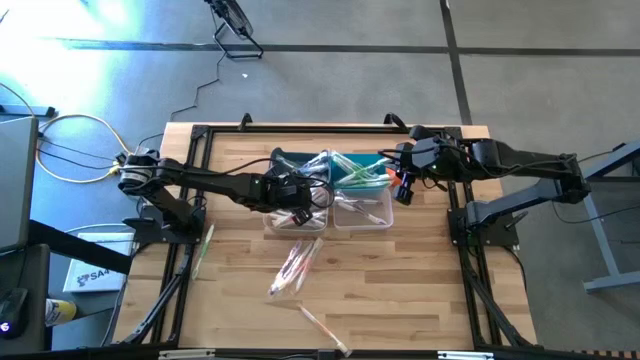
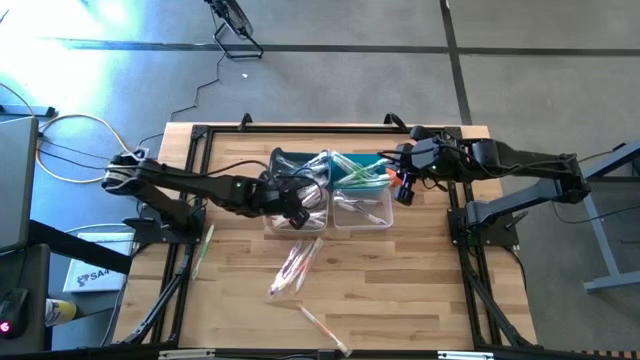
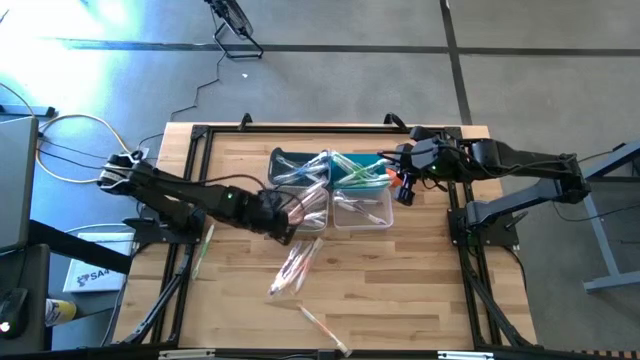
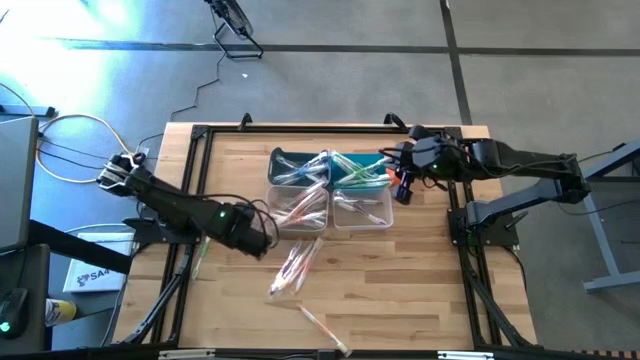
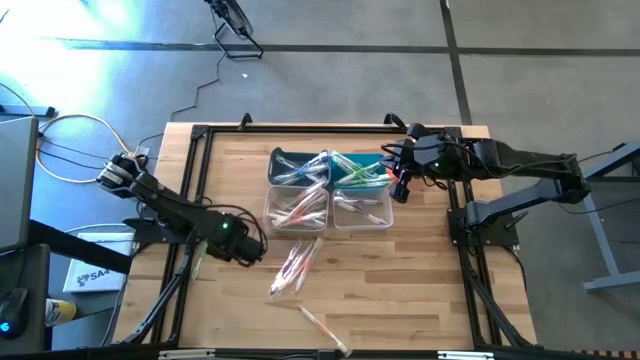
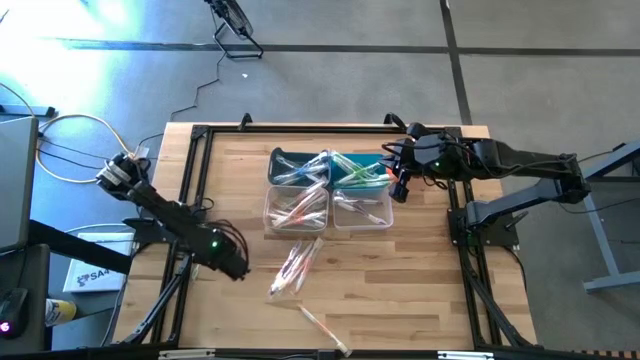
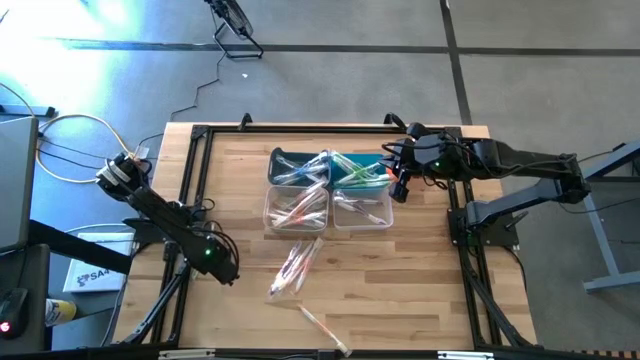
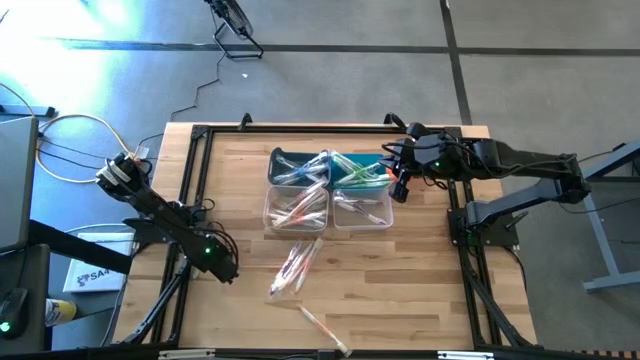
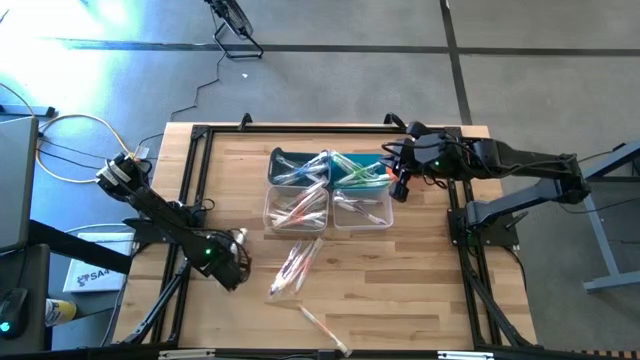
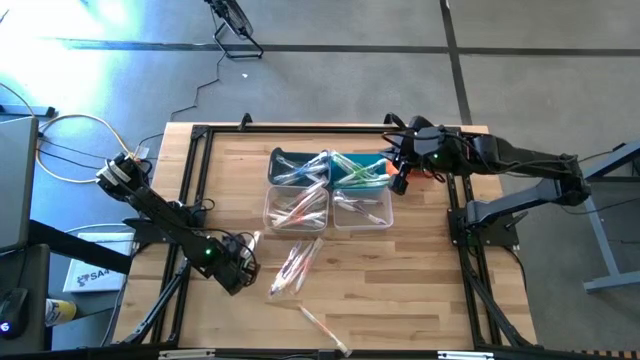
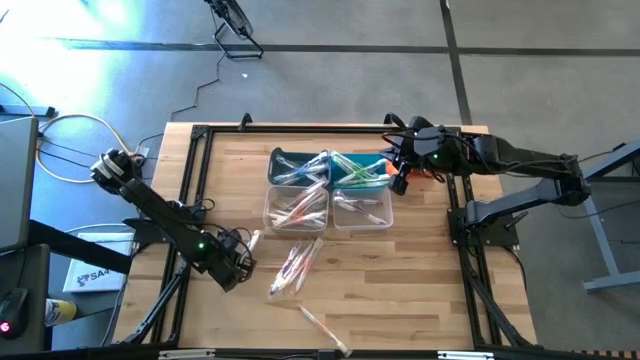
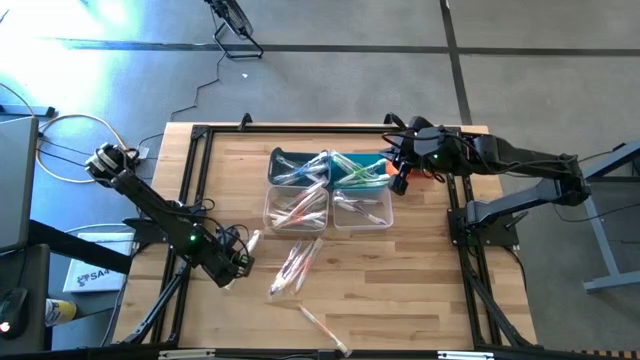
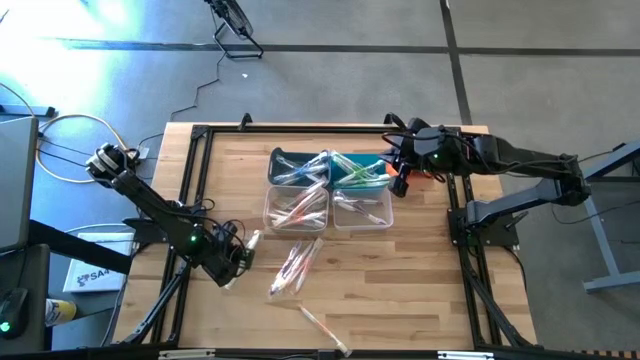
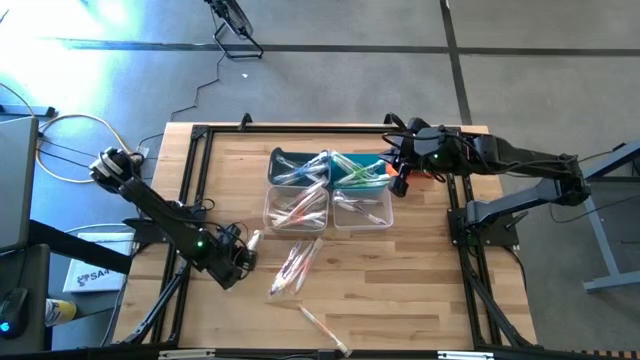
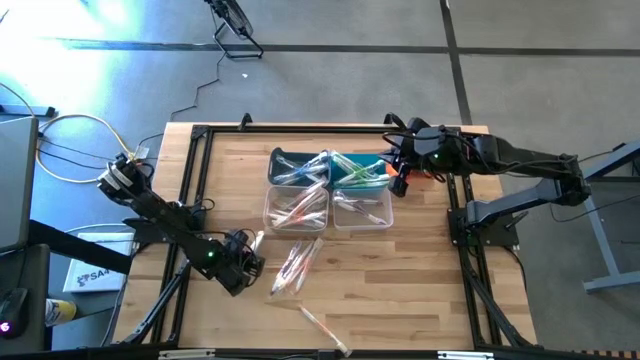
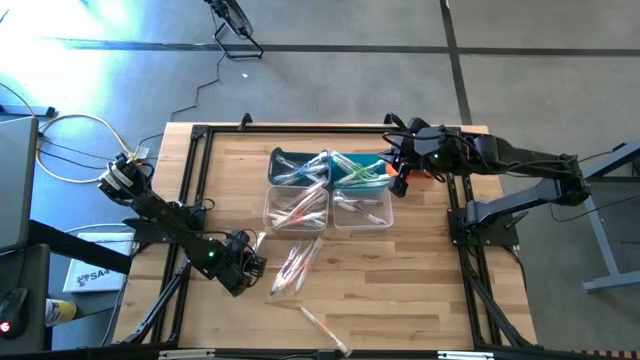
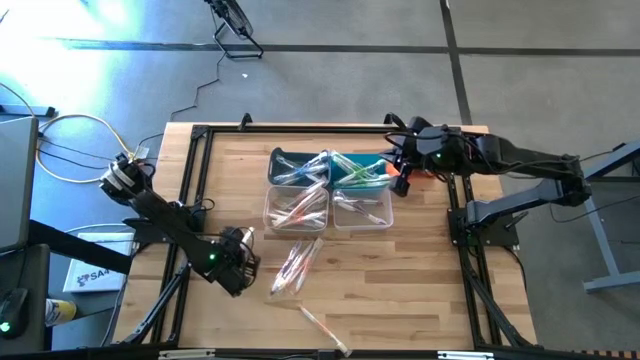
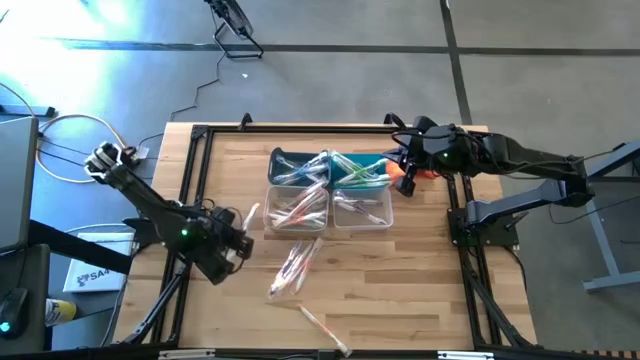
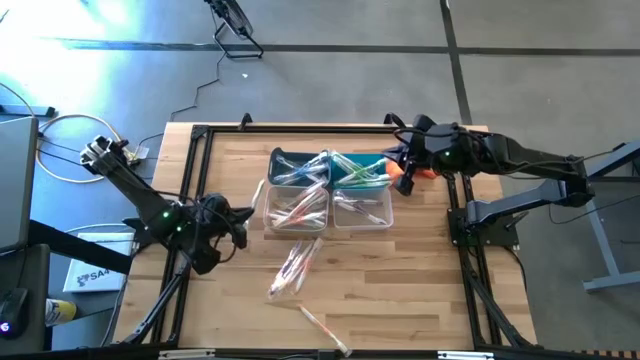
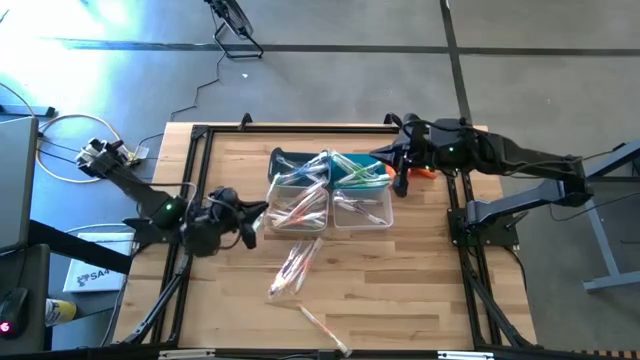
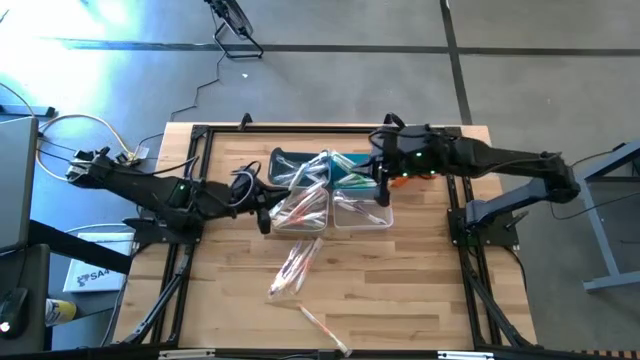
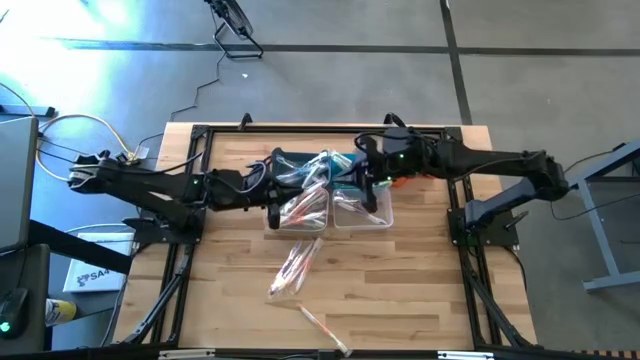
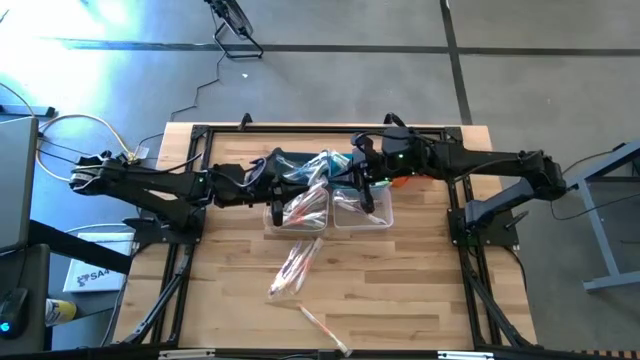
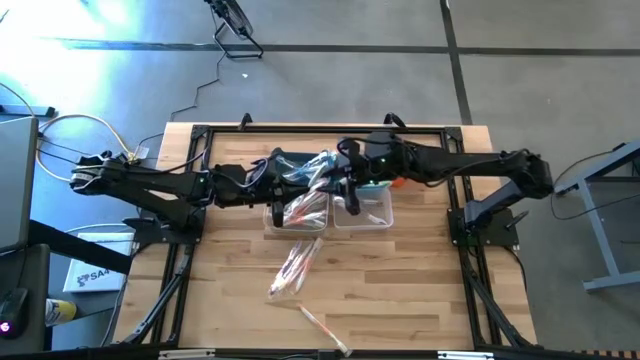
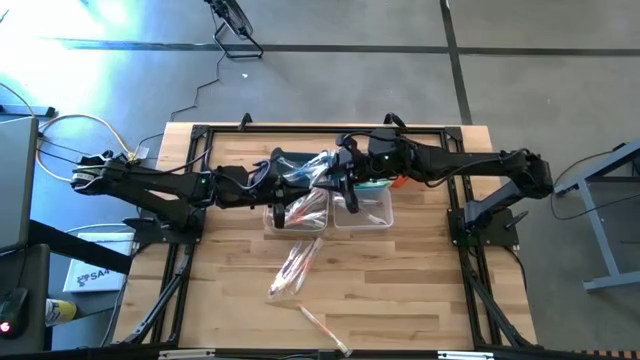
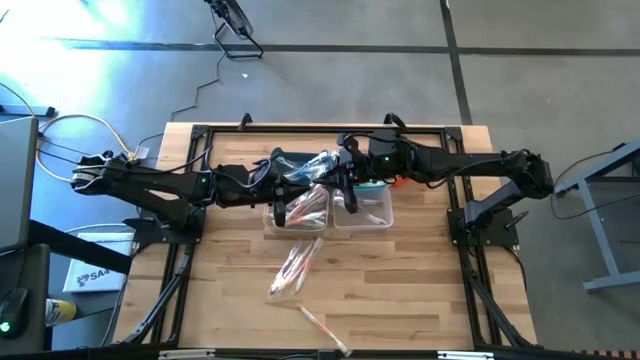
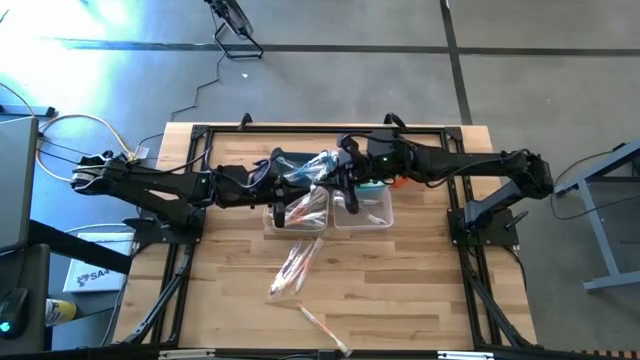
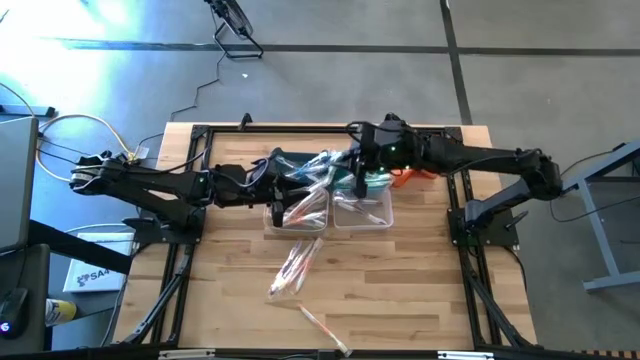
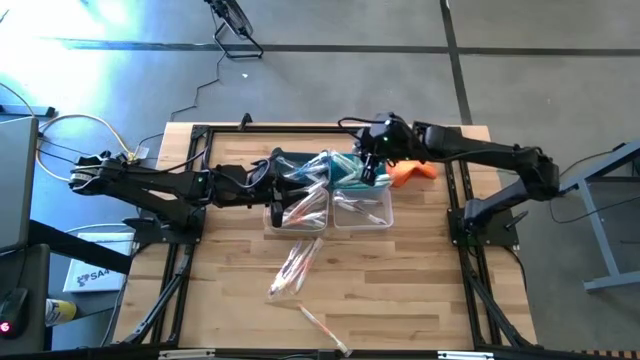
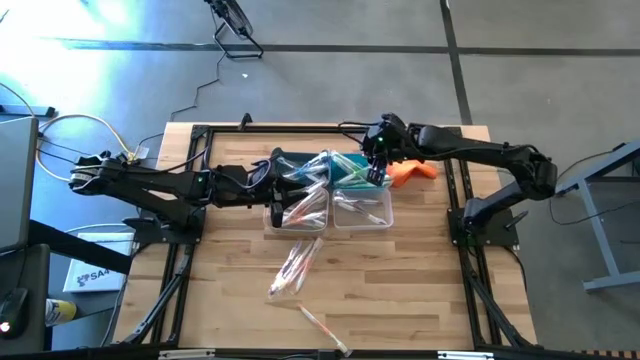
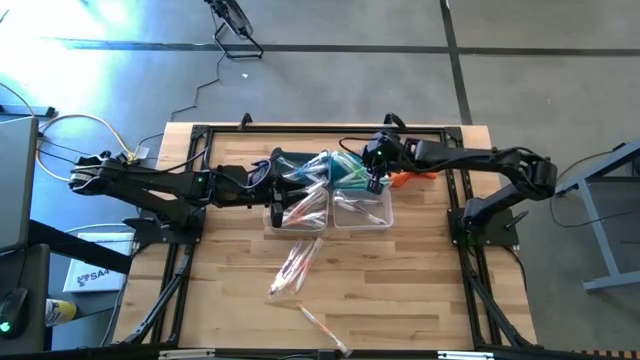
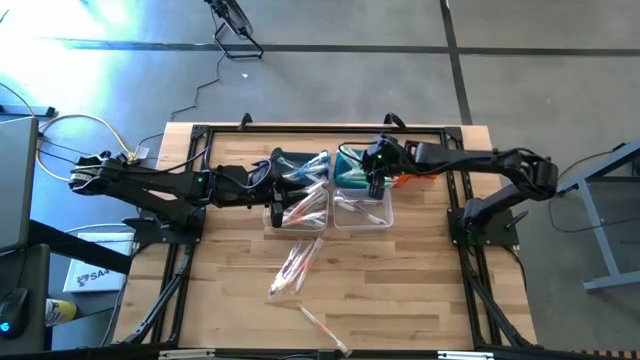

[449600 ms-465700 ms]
Task: Pick & Place Toothbrushes
Put the green toothbrush into the blue bin

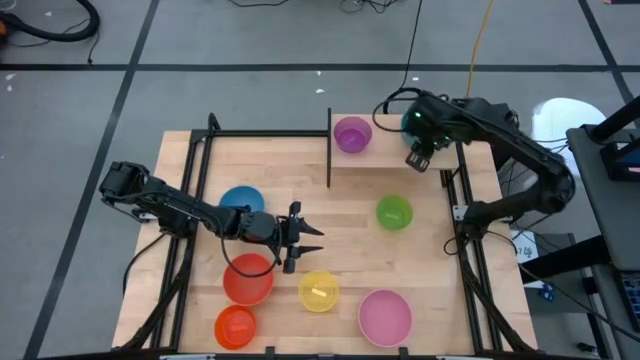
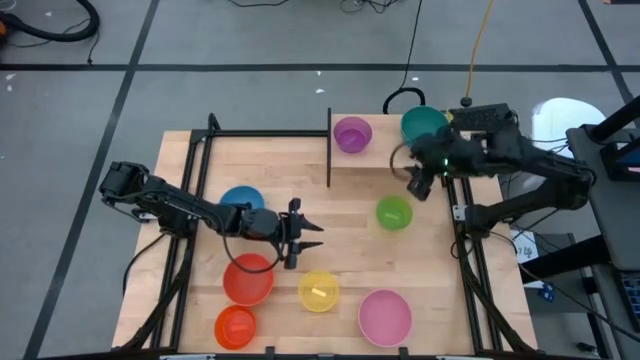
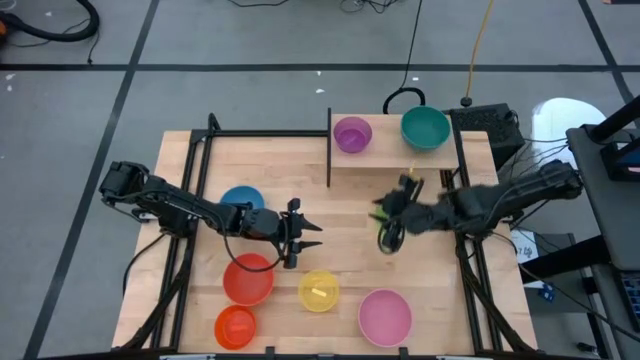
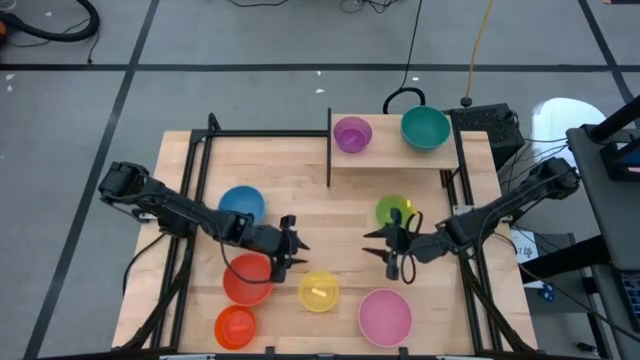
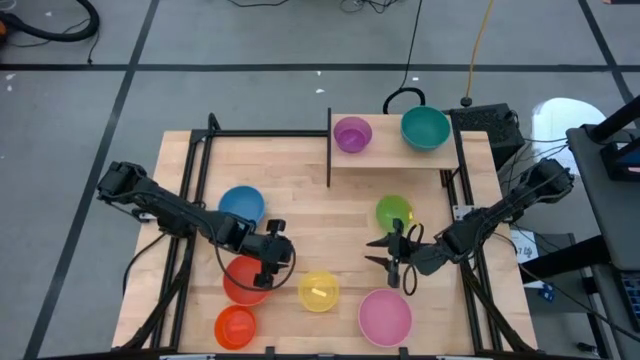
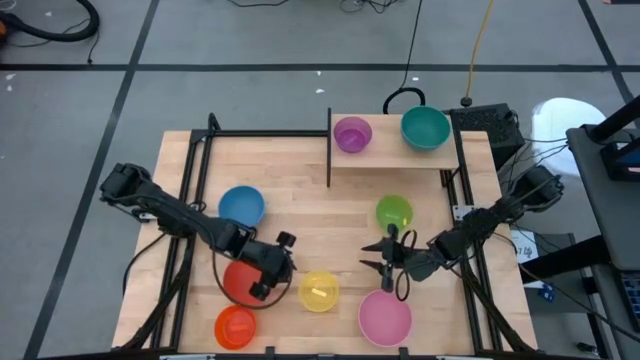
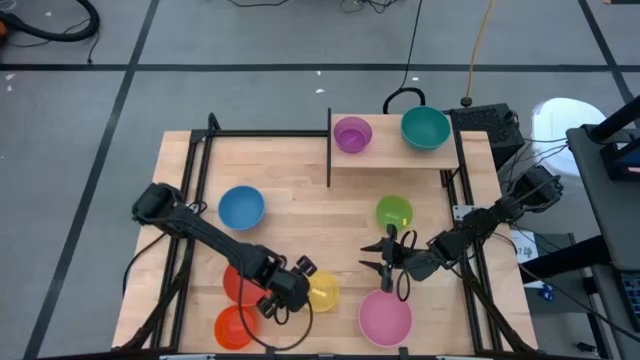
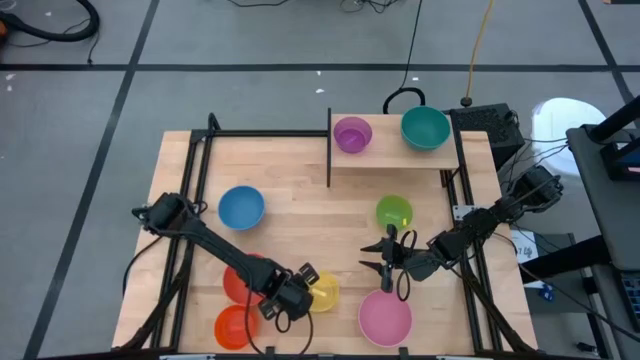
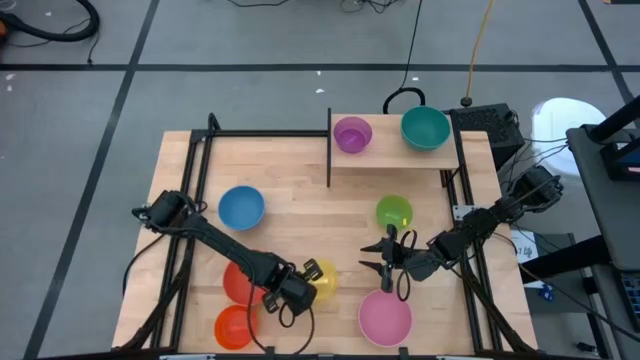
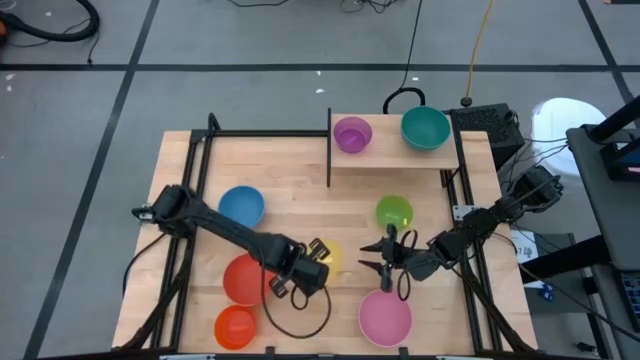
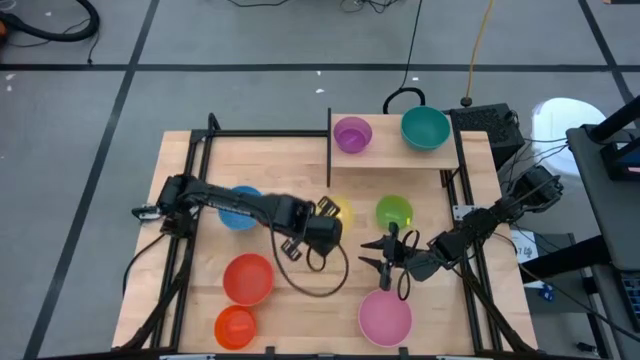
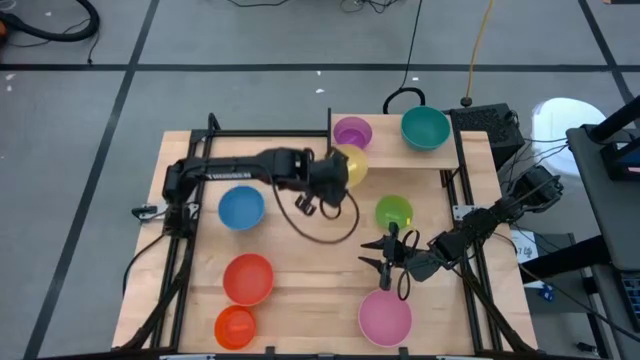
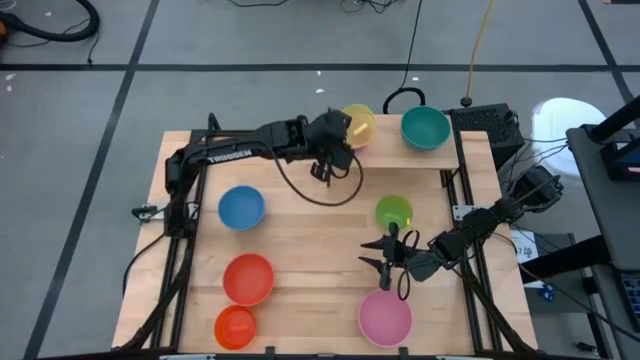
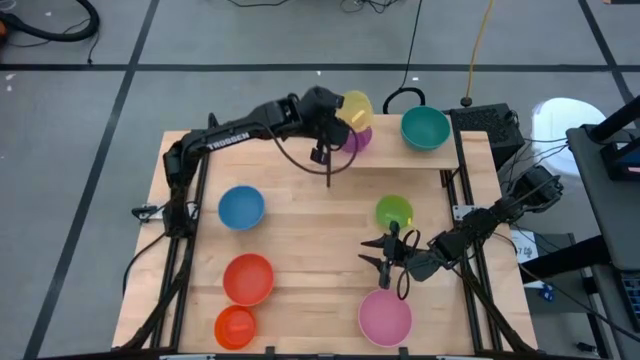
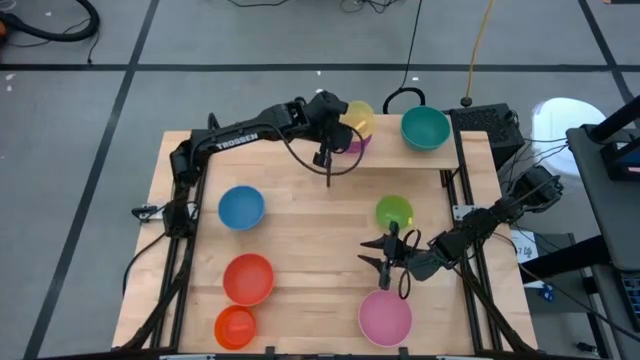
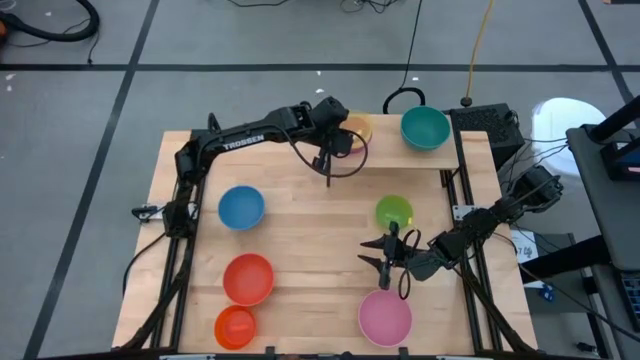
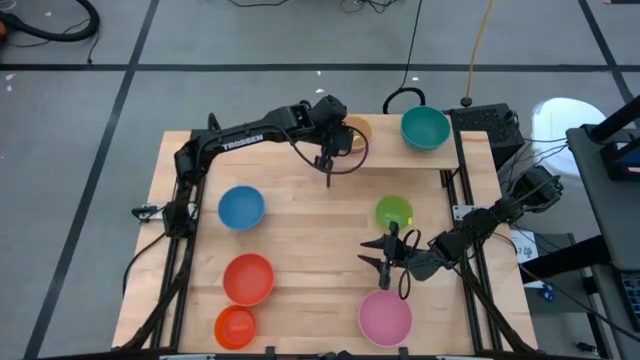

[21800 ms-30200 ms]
Task: Place and stack bowls onto a shelf
Stack the small yellow bowl on top of the small violet bowl on the shelf
